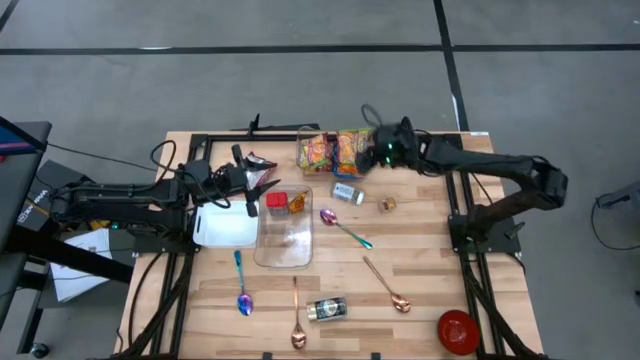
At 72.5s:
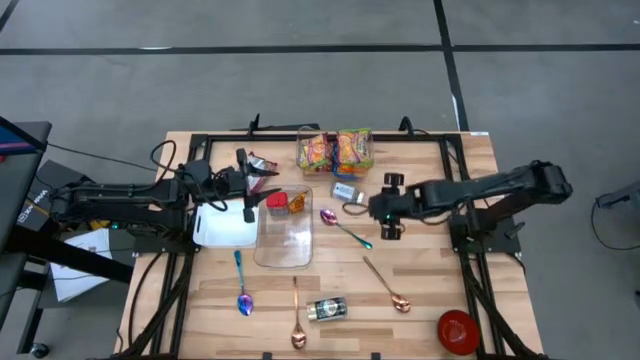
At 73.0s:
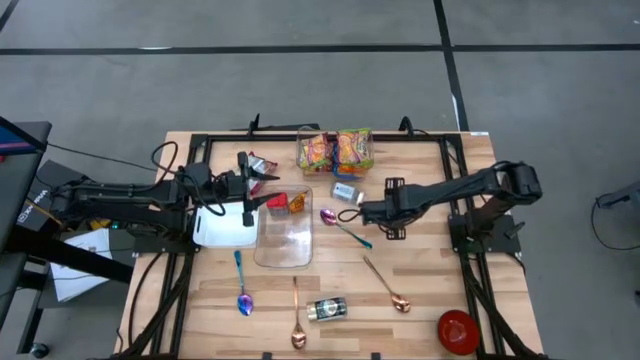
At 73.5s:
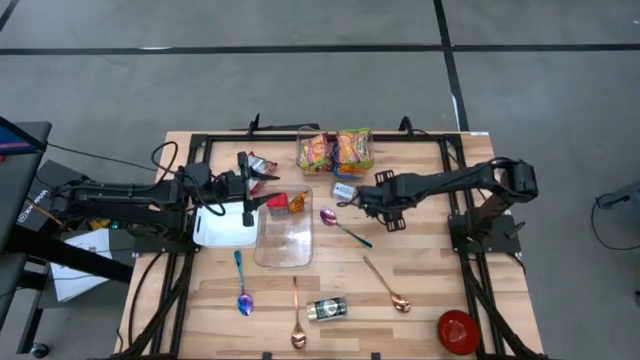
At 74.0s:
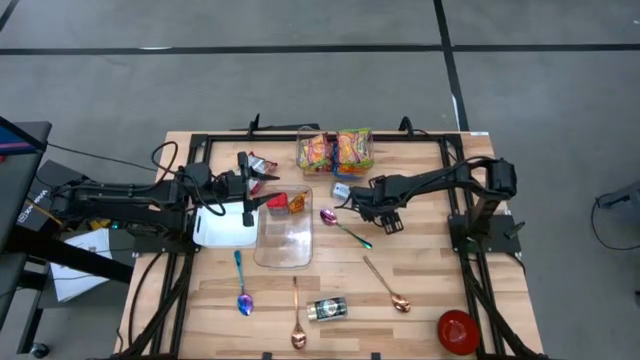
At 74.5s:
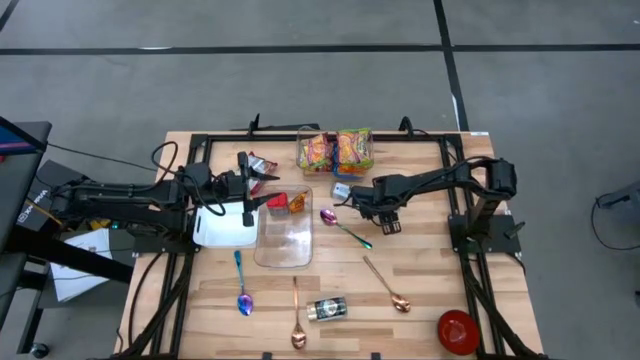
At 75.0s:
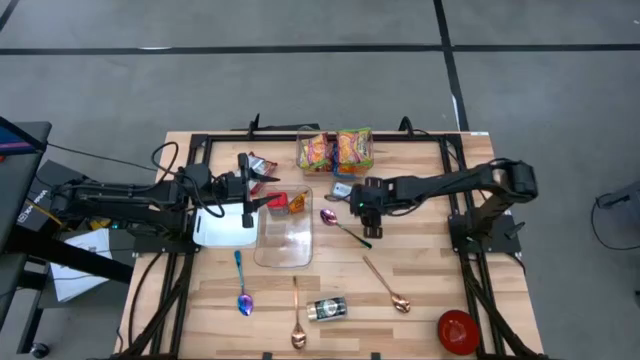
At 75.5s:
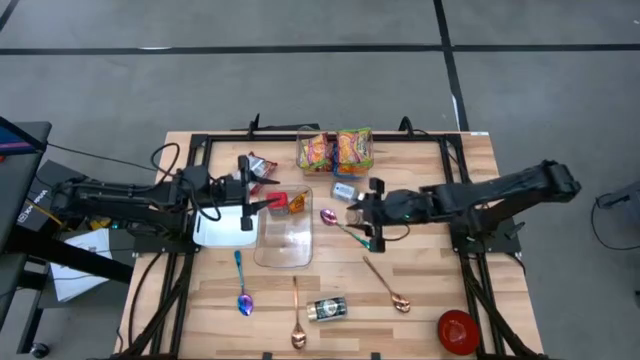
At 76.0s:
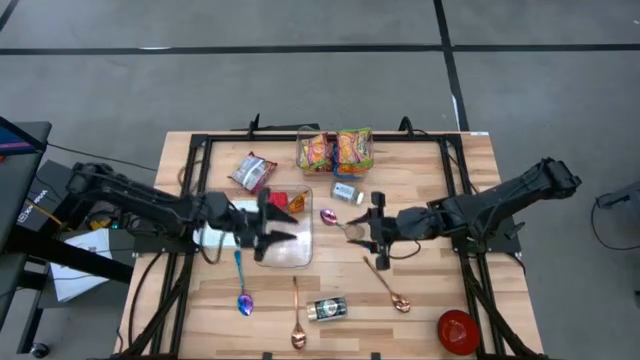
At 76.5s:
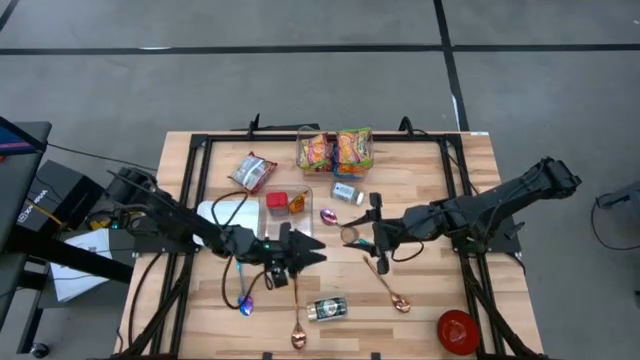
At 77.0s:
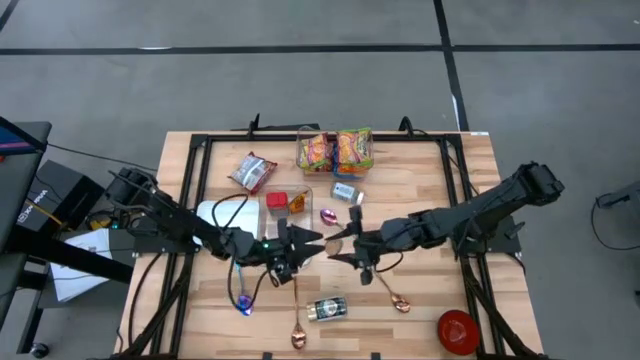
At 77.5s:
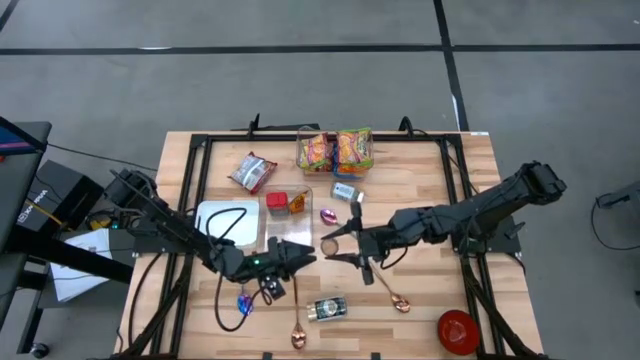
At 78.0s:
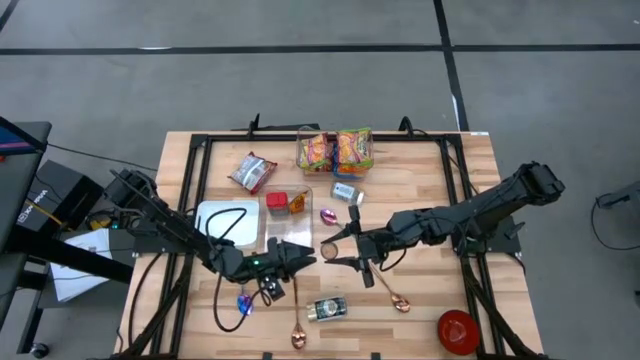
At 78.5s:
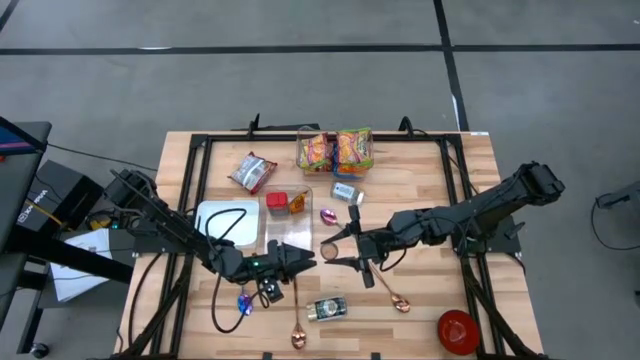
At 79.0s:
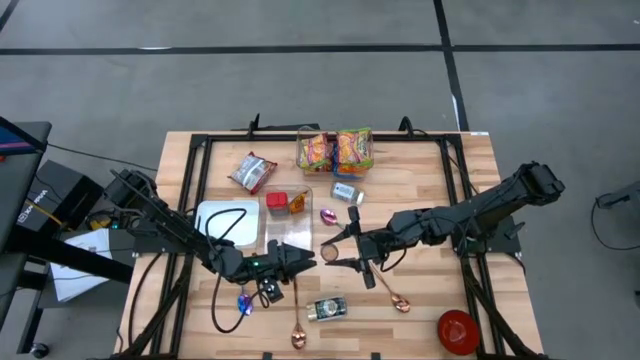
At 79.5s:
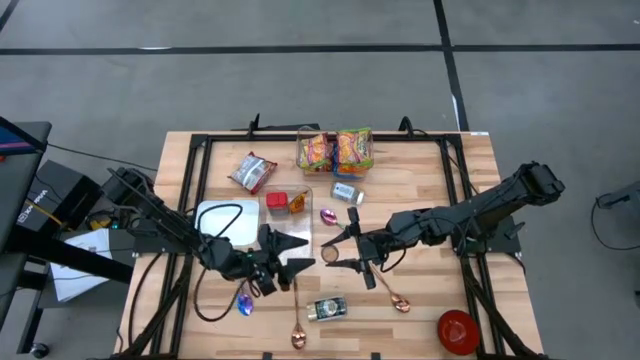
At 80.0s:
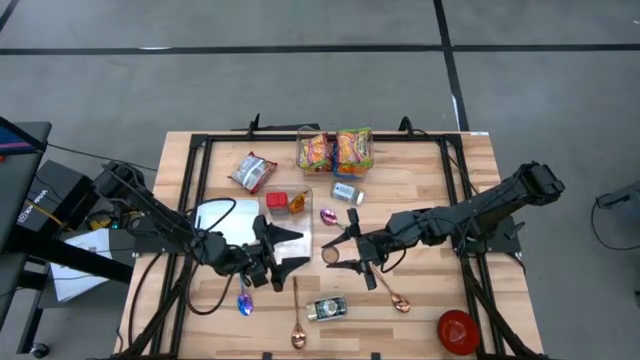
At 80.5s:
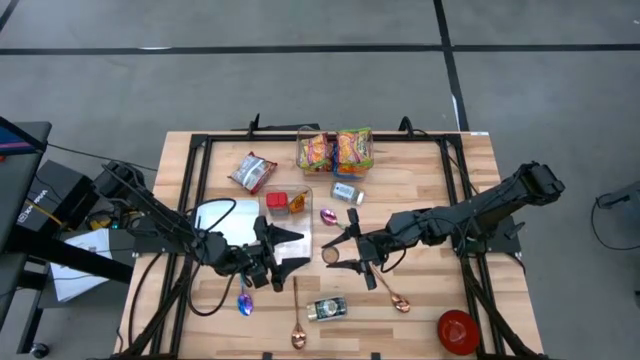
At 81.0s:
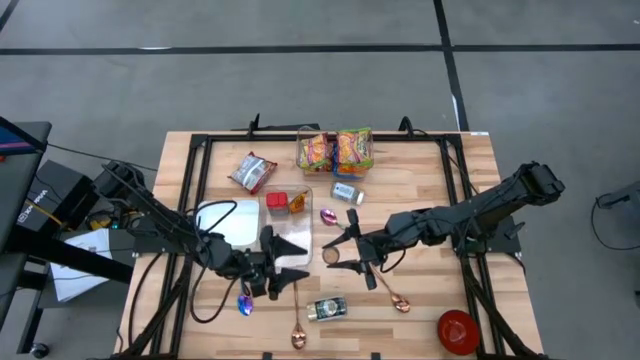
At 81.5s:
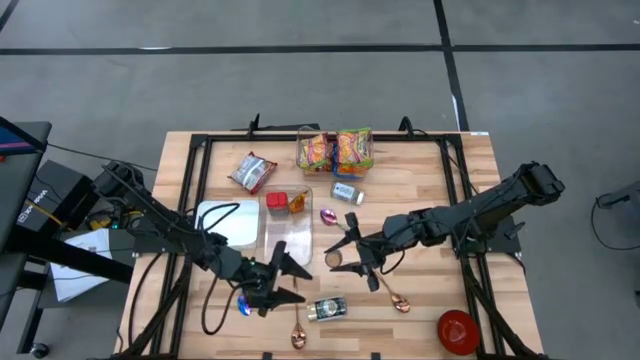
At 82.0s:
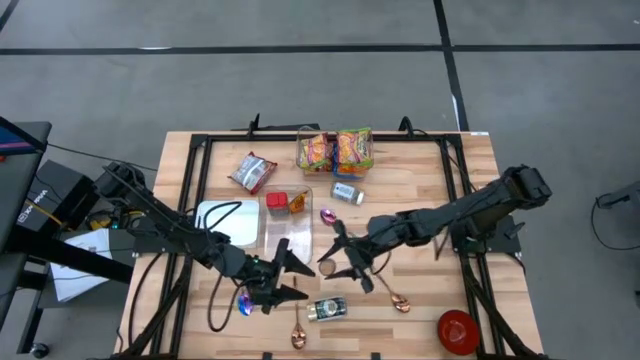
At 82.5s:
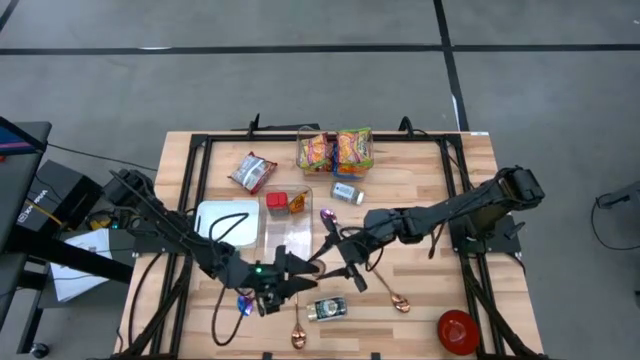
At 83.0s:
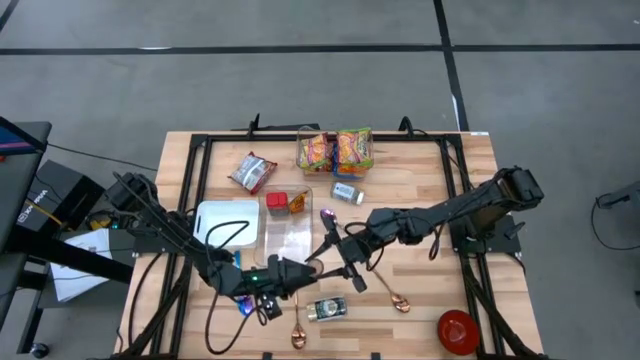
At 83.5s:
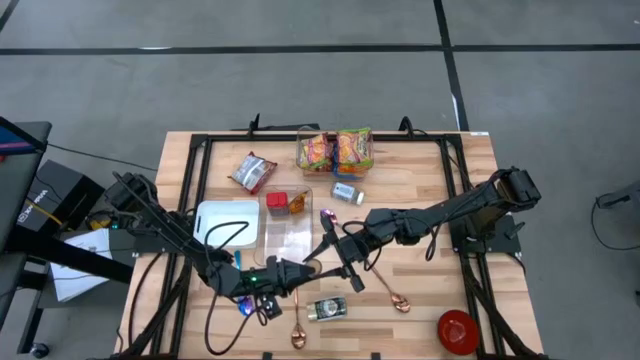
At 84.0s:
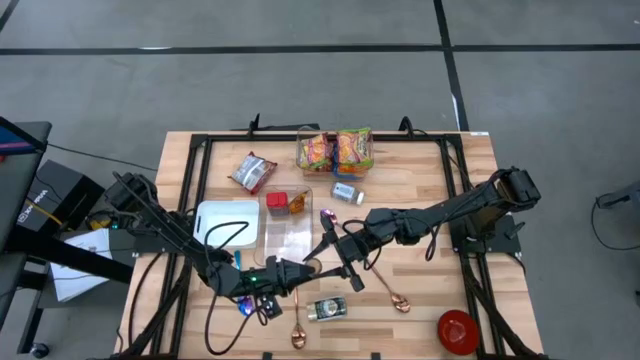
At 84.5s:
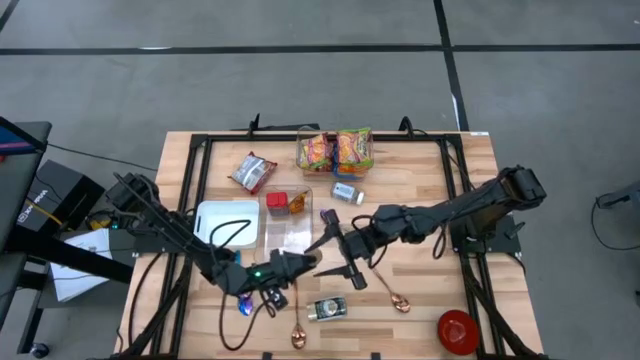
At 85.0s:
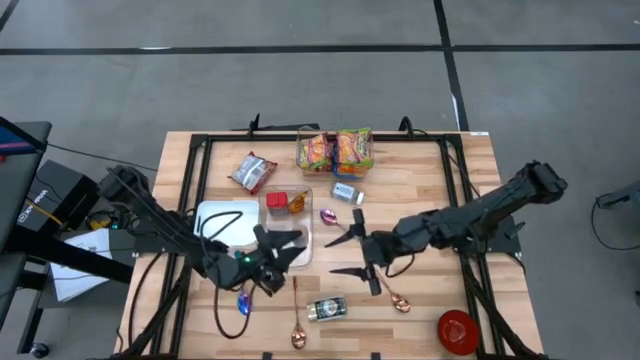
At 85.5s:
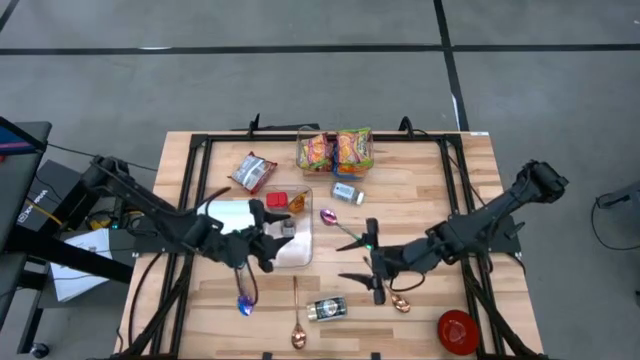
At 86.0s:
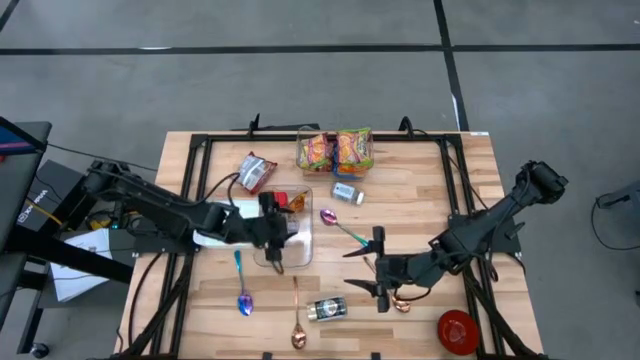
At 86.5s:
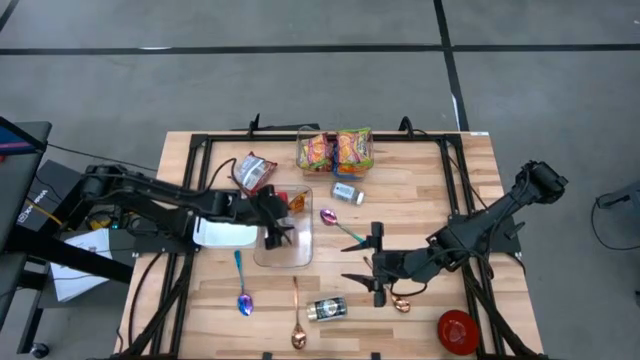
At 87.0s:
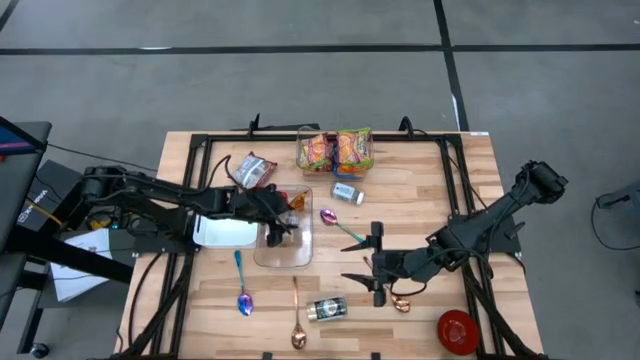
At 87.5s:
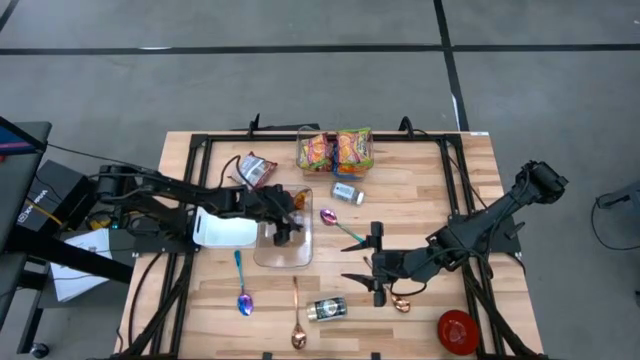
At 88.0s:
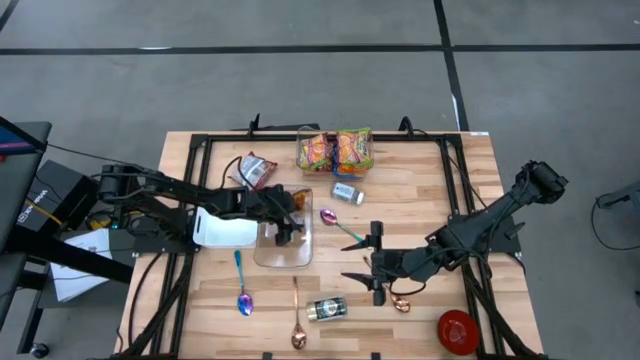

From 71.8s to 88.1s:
Task: Pick & Place Food Item
Put the brown seasoning bottle into the bottom transparent bin

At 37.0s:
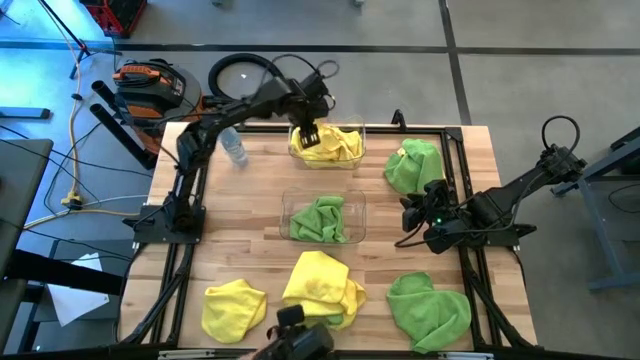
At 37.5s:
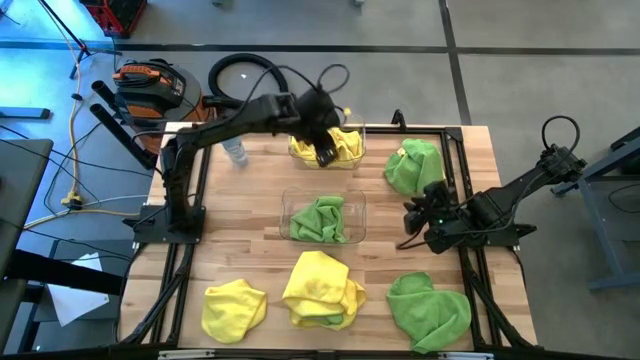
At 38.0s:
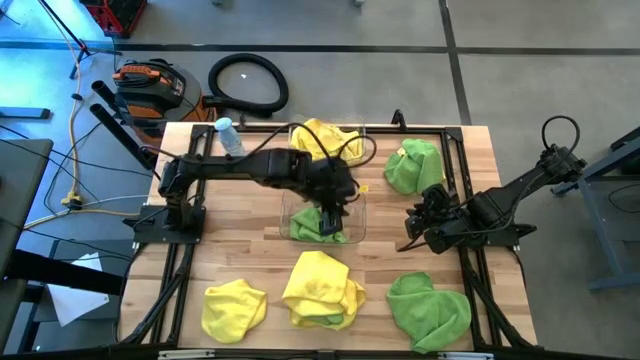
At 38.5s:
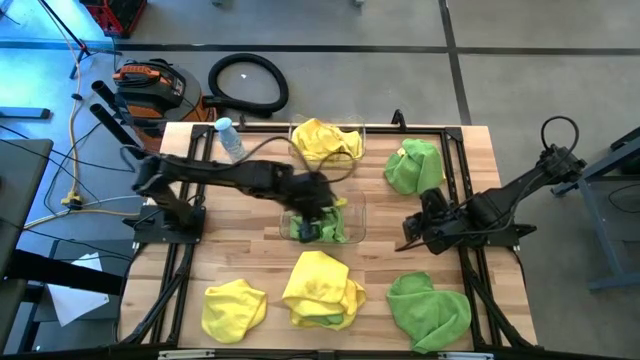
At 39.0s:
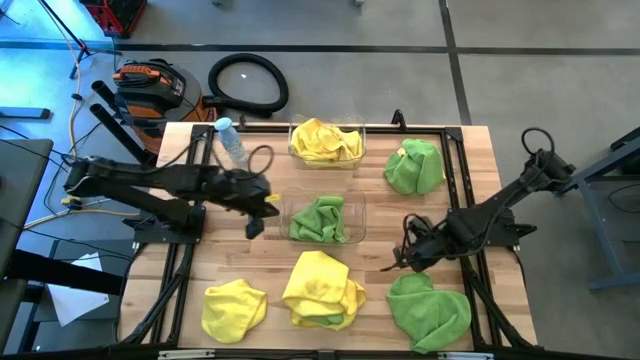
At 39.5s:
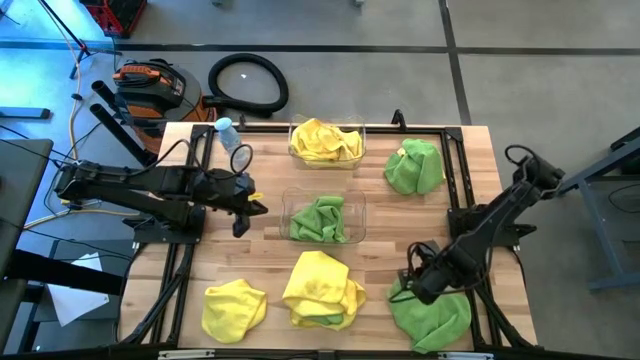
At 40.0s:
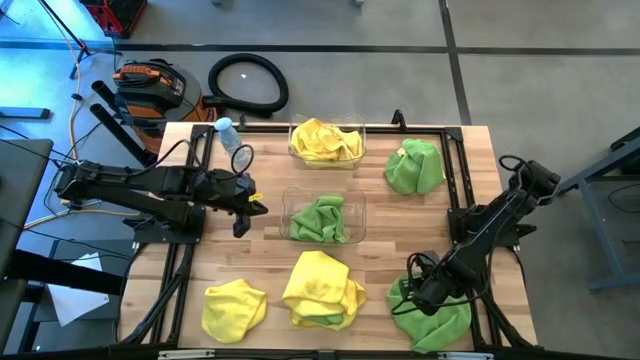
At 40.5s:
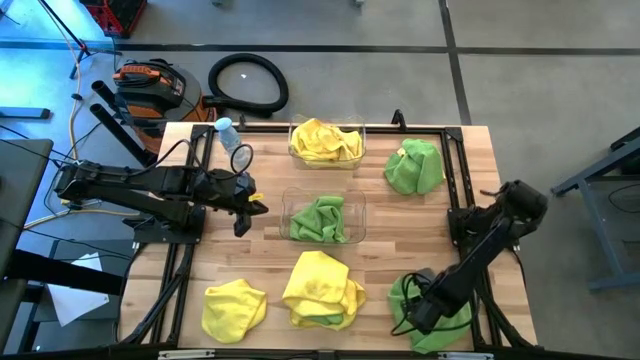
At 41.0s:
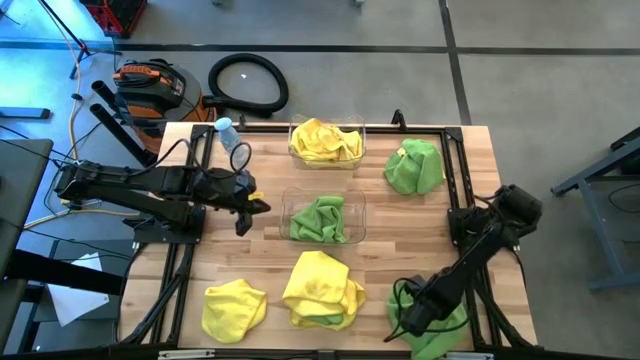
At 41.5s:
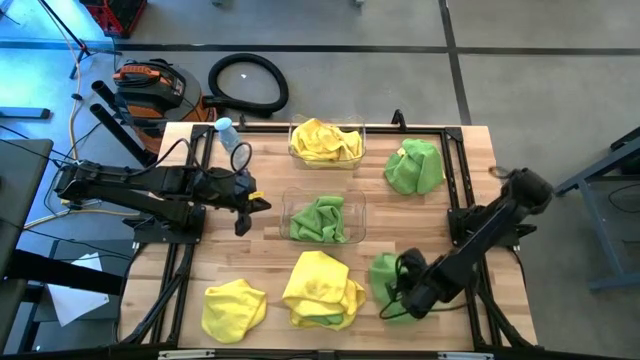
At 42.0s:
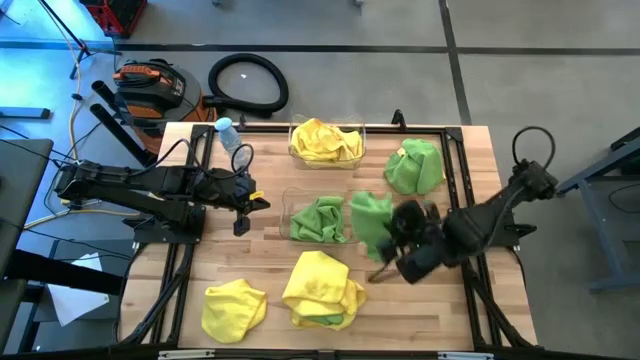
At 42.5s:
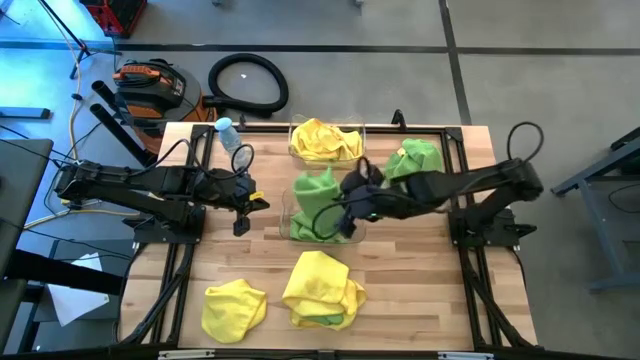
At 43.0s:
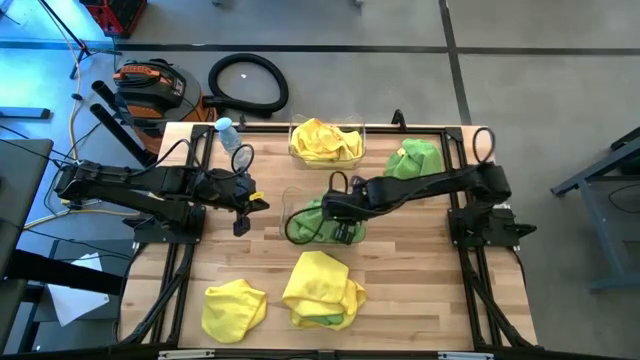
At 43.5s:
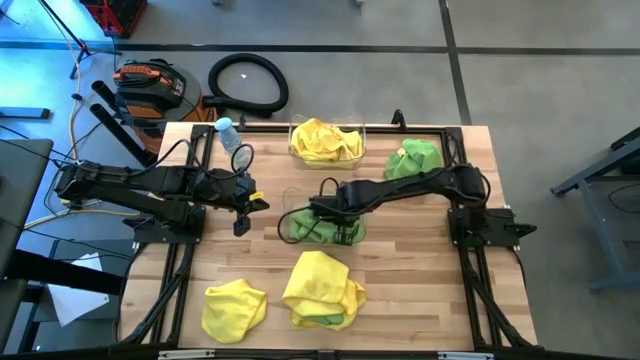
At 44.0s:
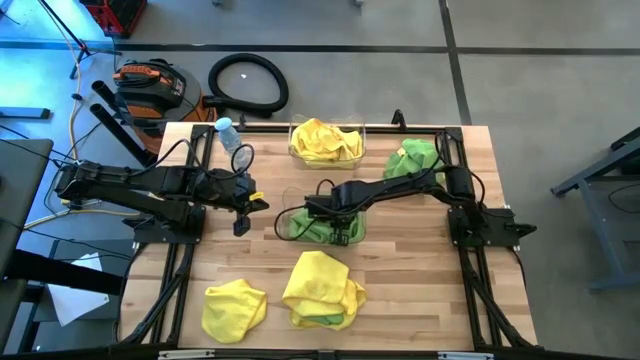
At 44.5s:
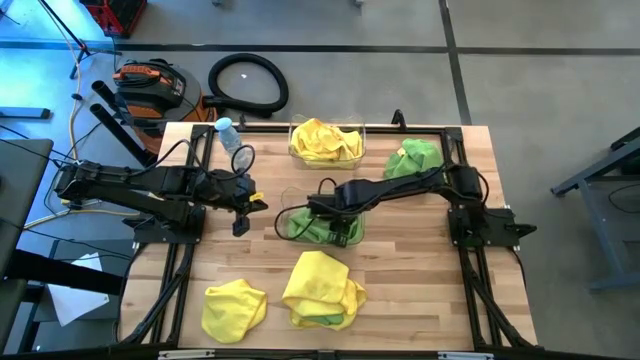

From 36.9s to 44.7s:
Task: Sort microfiber towel by color & place in baskets
Put the green towel into the bottom transparent bin
